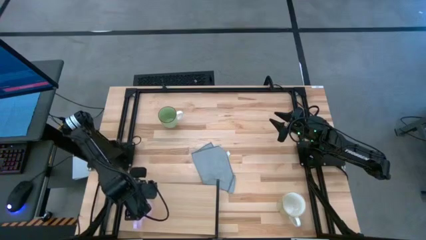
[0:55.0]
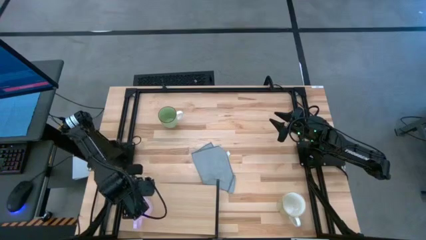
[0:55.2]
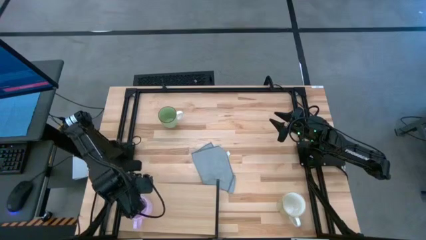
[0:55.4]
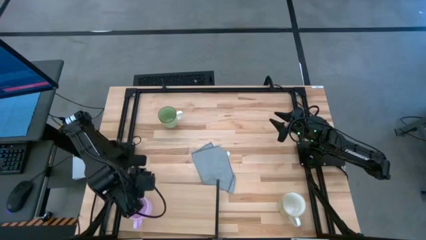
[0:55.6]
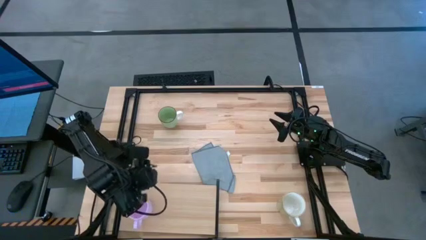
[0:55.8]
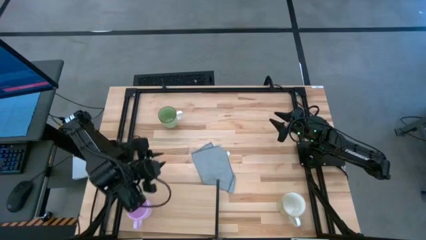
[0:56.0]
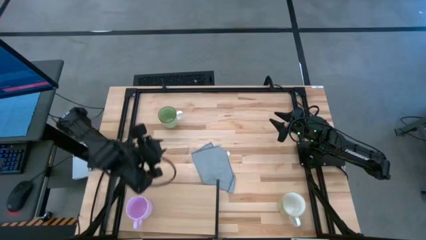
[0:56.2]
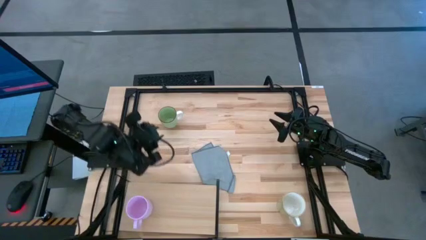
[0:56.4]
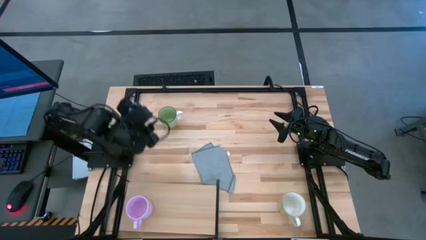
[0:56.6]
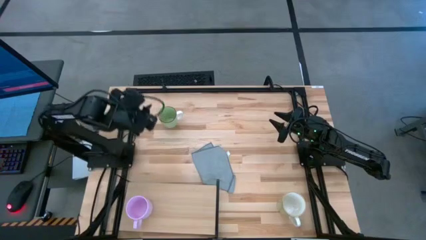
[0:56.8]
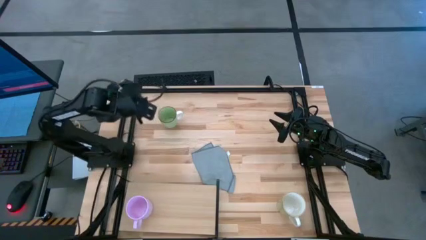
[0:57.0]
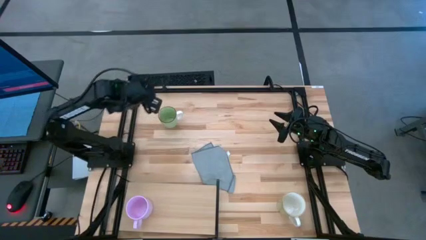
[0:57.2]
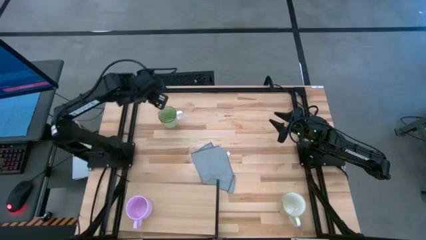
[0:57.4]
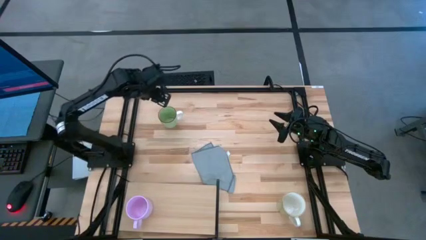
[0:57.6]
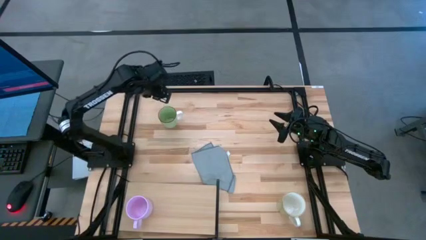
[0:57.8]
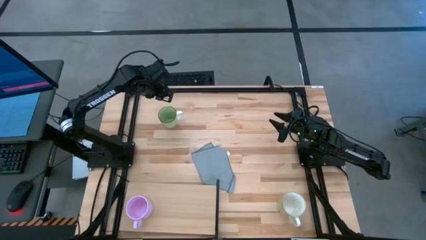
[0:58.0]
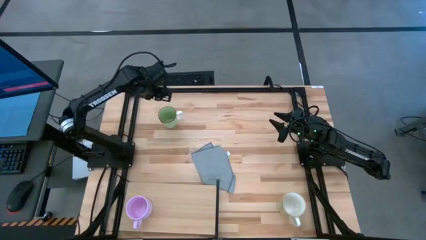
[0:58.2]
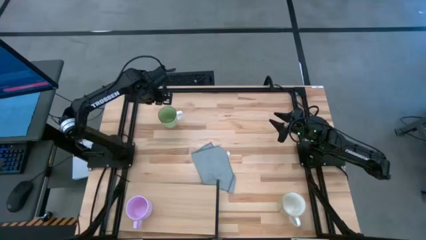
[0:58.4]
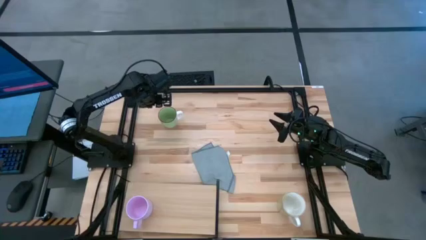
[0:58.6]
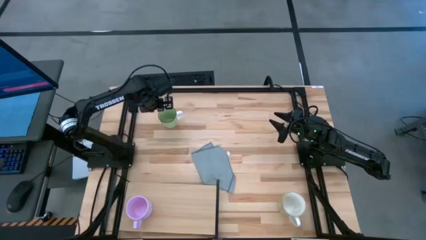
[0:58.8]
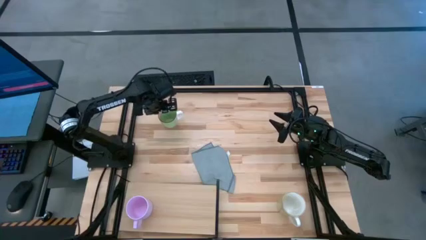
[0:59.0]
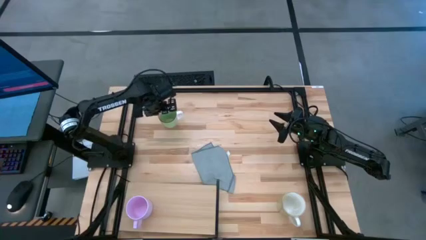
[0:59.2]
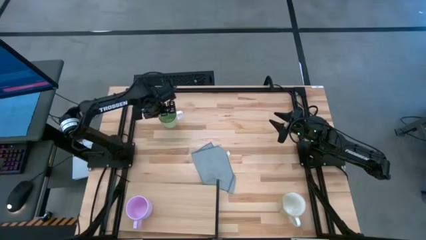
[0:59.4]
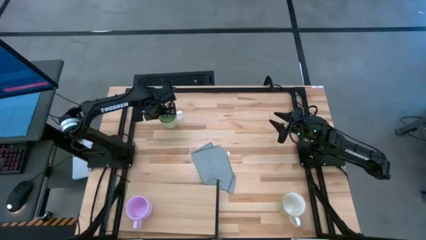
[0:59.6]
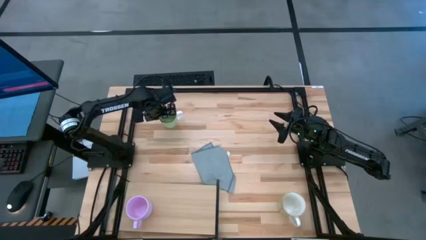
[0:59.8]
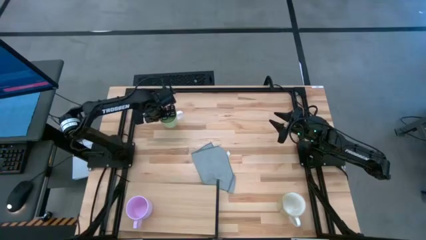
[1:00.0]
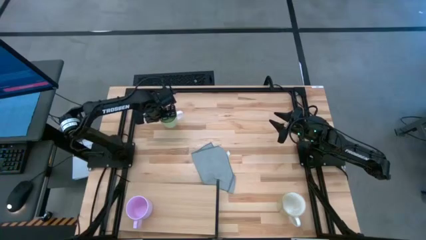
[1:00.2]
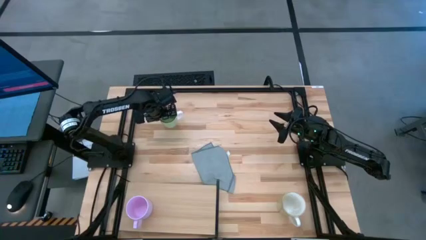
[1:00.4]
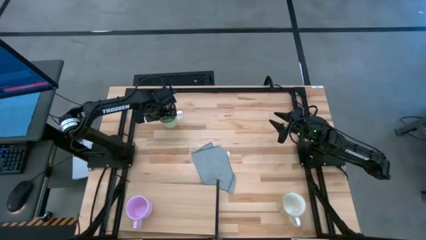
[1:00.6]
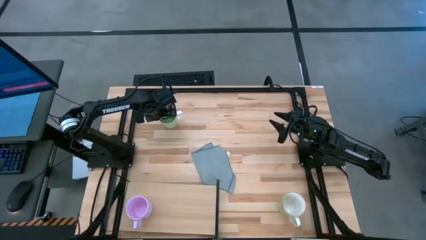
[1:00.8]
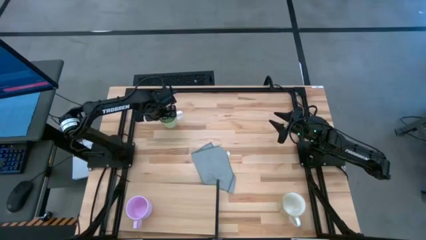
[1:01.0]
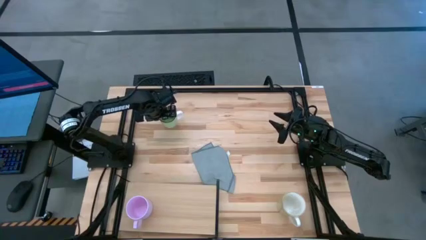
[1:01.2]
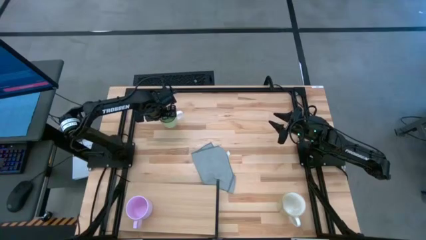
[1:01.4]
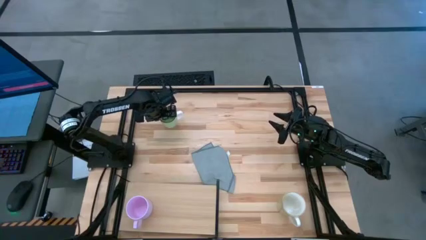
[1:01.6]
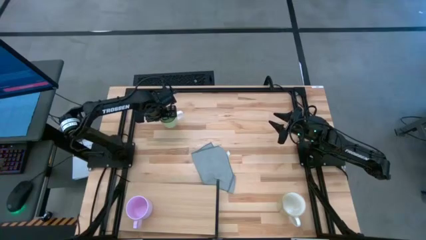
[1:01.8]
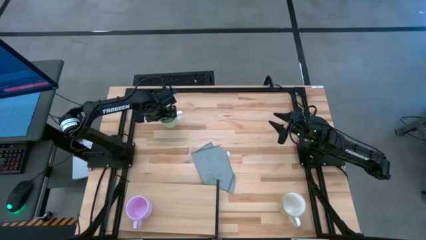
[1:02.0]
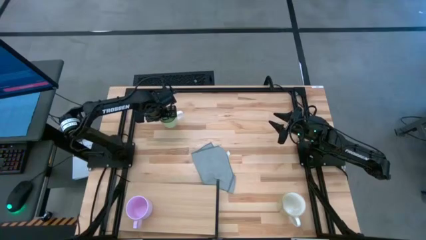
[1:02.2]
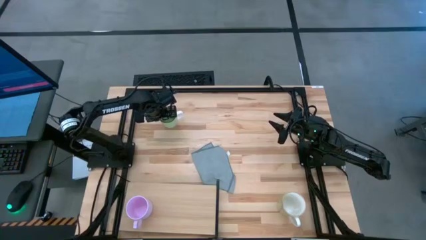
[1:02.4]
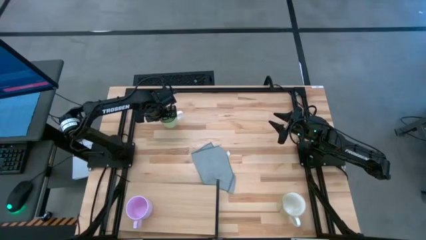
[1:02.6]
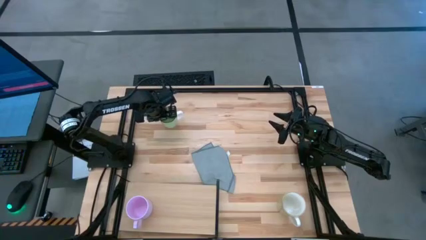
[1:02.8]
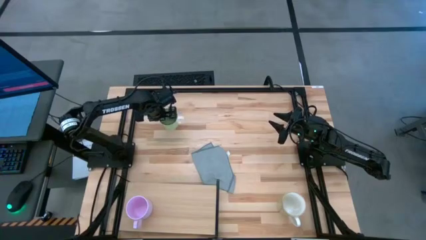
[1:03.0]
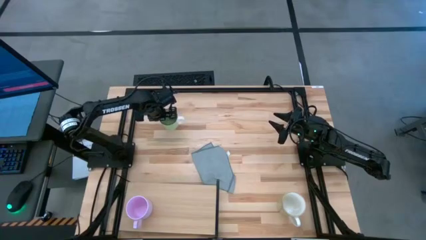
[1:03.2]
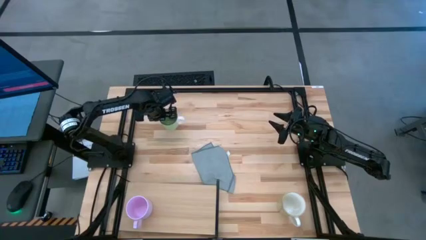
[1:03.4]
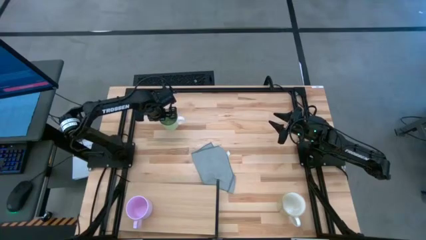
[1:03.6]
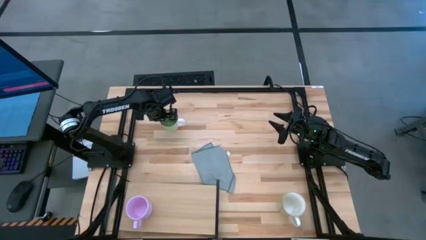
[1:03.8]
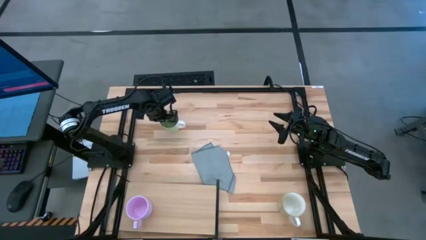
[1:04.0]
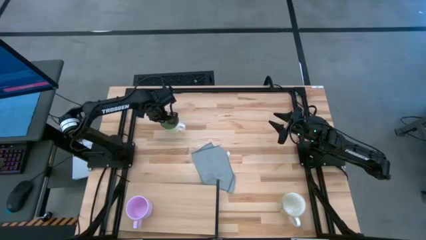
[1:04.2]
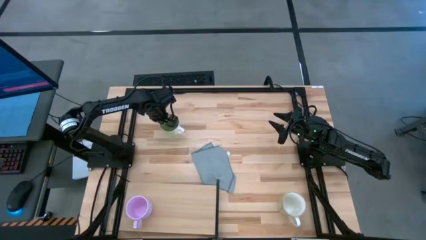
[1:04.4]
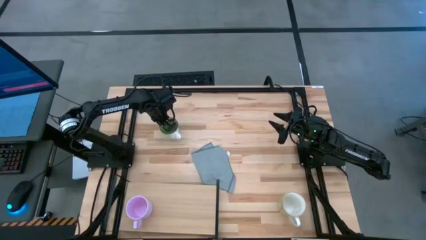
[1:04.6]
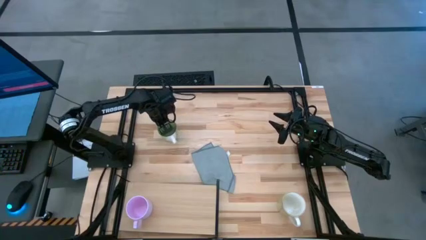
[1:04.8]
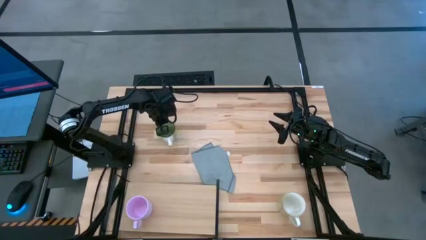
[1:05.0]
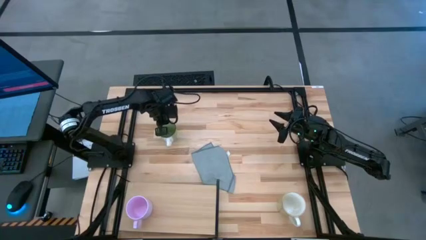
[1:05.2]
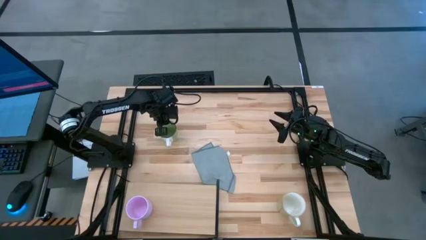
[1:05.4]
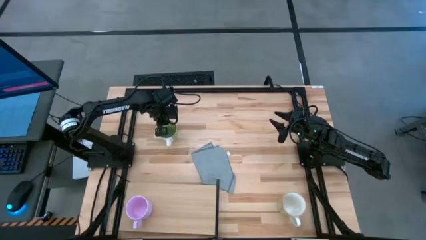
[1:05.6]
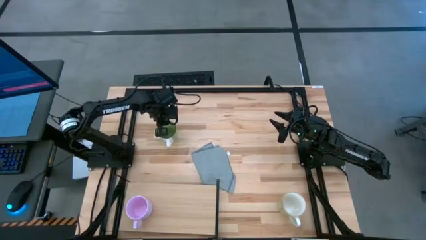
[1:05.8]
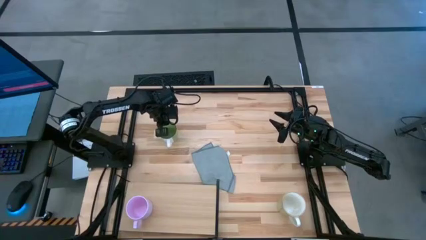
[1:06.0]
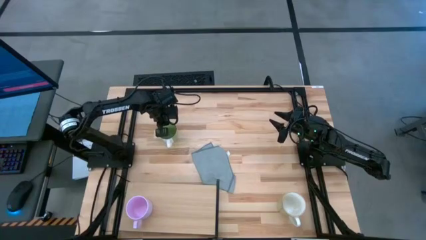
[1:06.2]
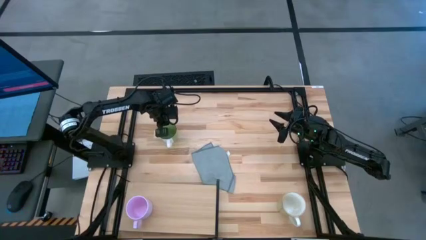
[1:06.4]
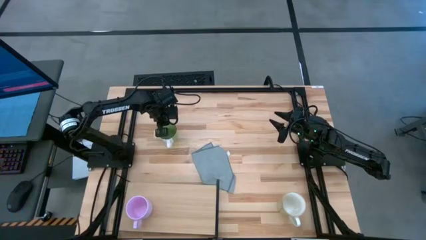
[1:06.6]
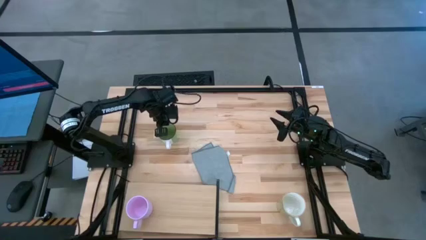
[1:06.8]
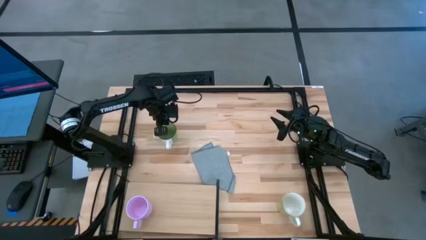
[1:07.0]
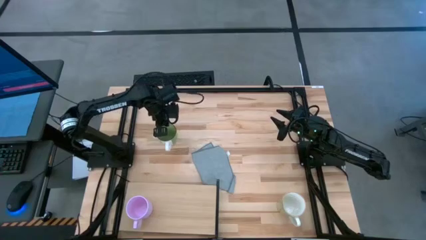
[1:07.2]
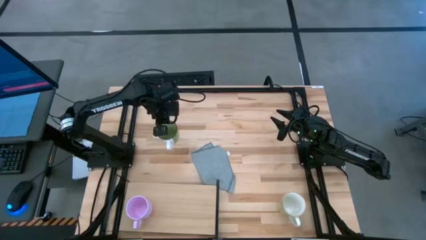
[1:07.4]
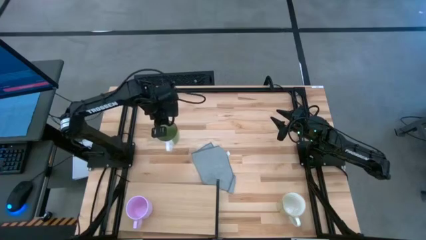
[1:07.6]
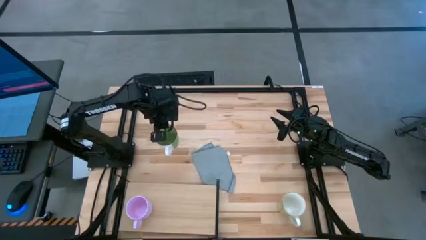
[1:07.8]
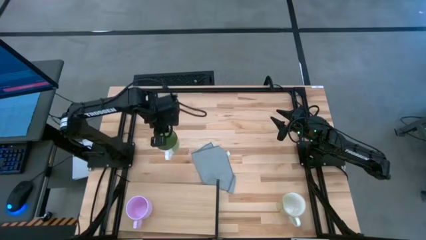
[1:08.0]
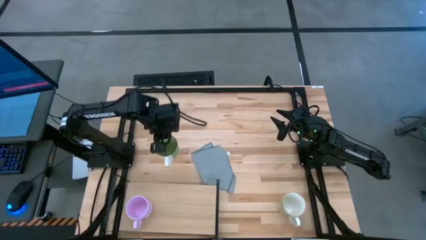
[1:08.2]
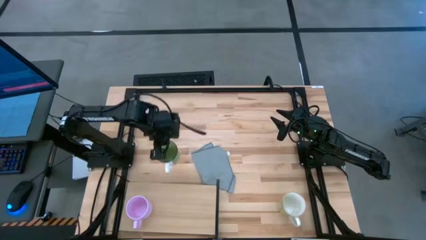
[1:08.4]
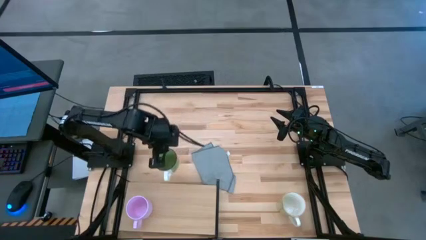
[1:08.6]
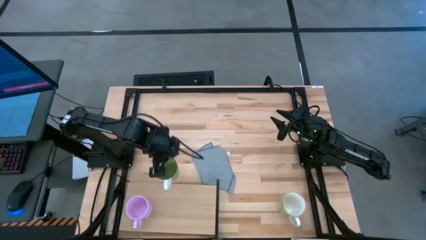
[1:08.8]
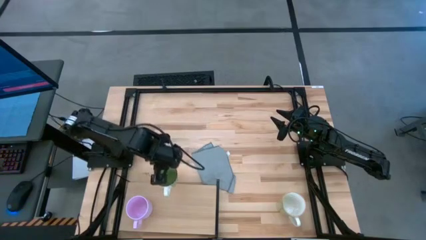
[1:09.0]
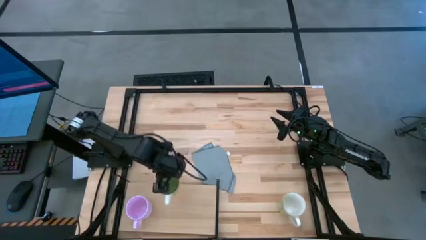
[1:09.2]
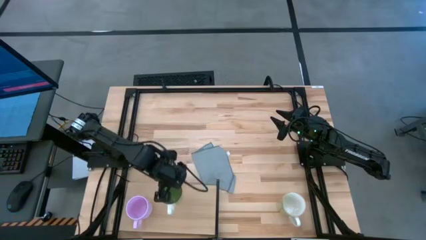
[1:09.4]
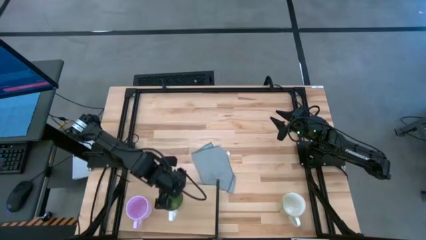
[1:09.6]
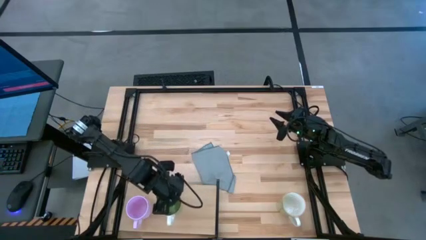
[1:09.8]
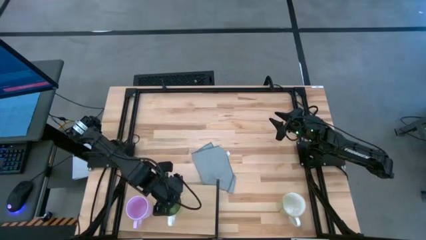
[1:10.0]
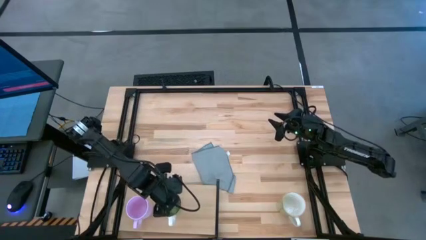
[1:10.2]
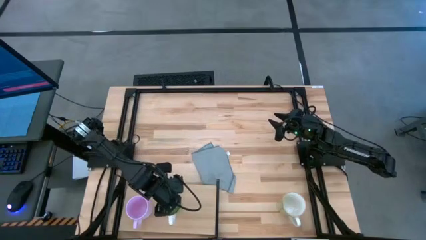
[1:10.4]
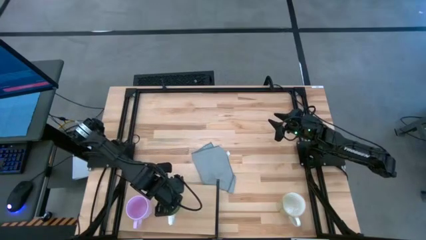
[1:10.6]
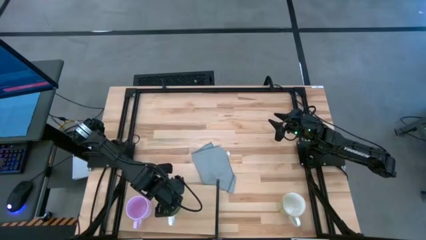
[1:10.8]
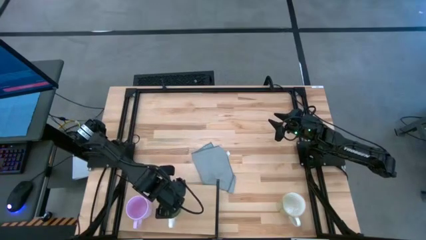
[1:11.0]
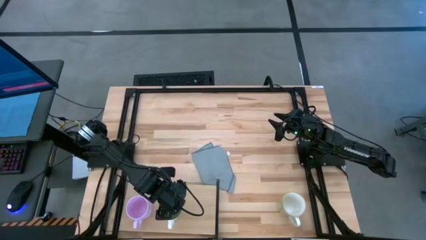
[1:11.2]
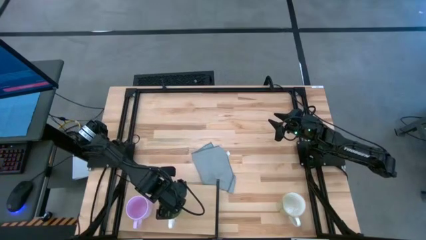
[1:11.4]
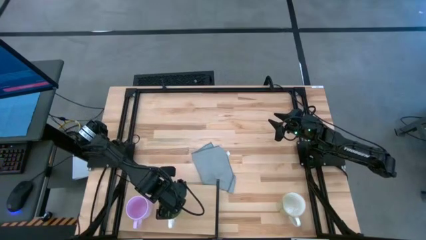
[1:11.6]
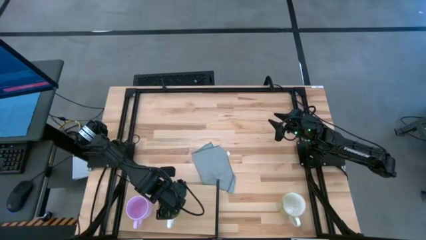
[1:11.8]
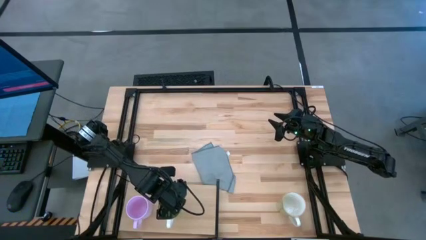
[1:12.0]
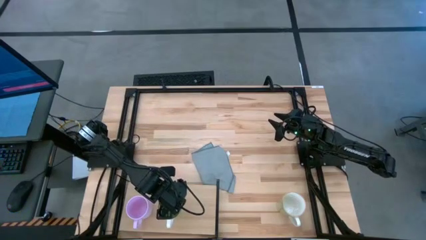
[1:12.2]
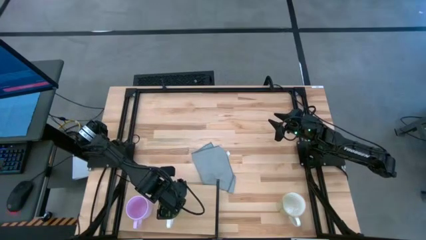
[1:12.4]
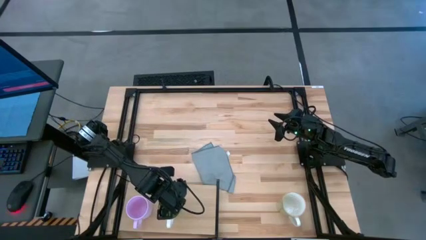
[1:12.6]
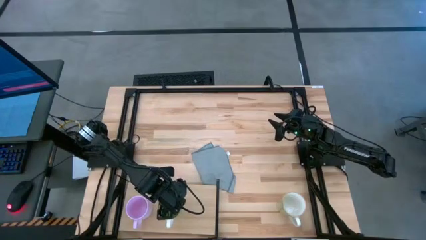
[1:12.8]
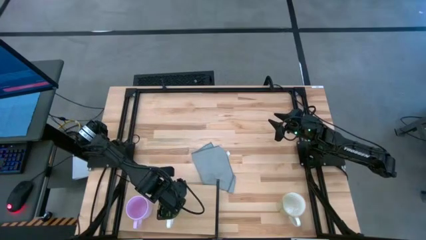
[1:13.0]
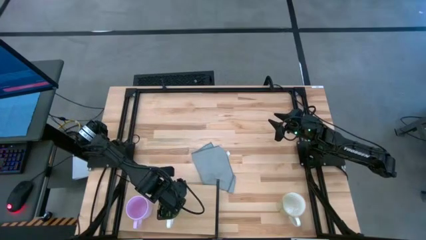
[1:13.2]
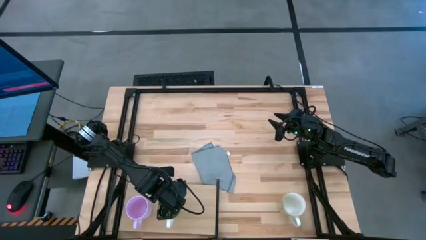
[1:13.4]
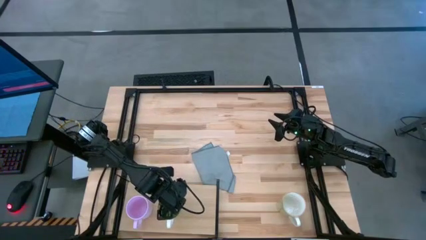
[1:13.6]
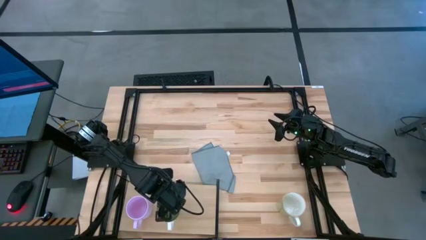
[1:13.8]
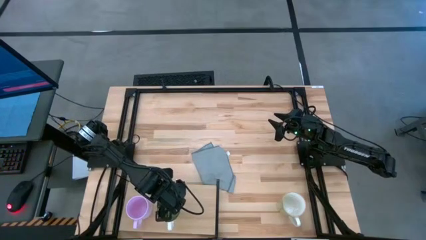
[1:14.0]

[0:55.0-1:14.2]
Task: Stack small to large cups/mugs on shelf
Put the green mug on the shelf
